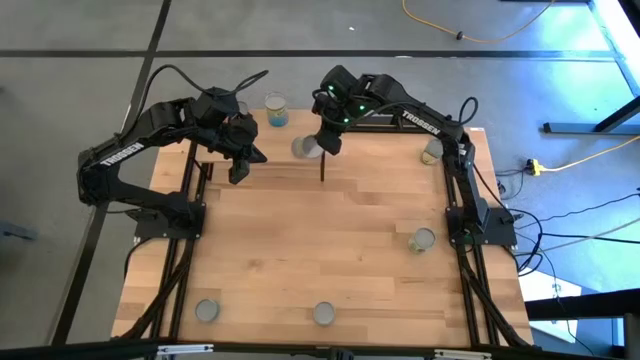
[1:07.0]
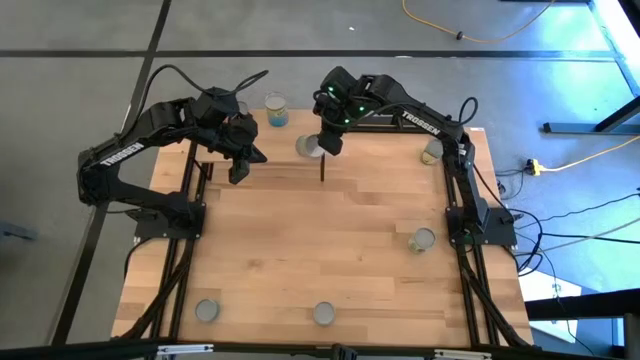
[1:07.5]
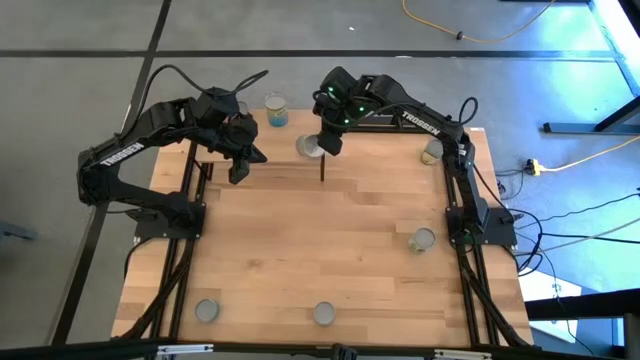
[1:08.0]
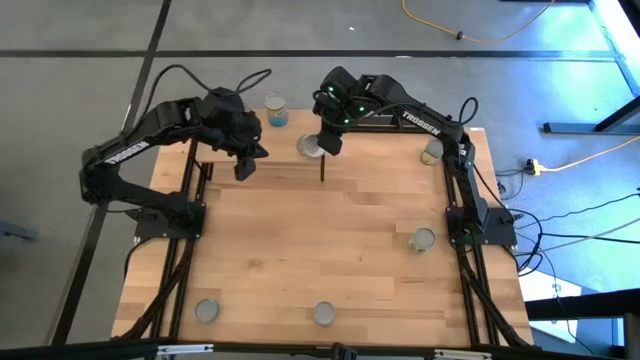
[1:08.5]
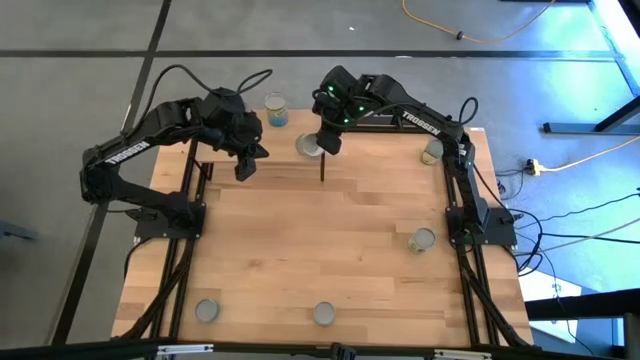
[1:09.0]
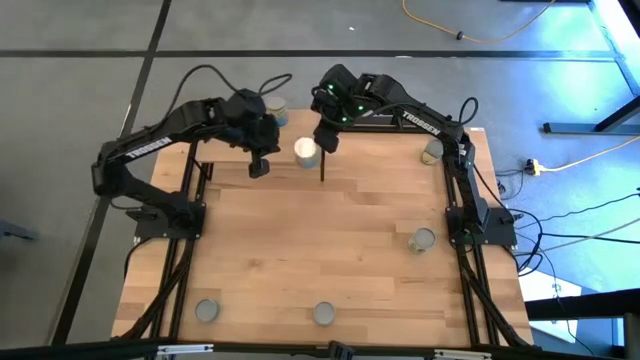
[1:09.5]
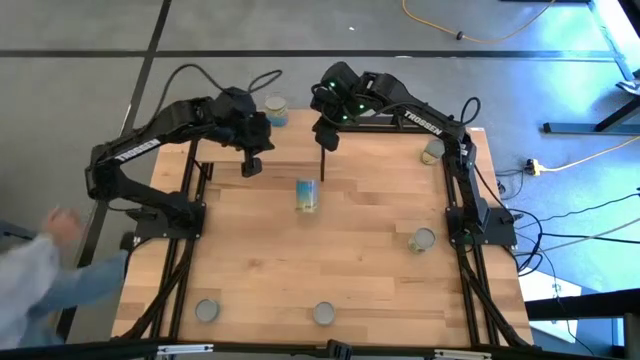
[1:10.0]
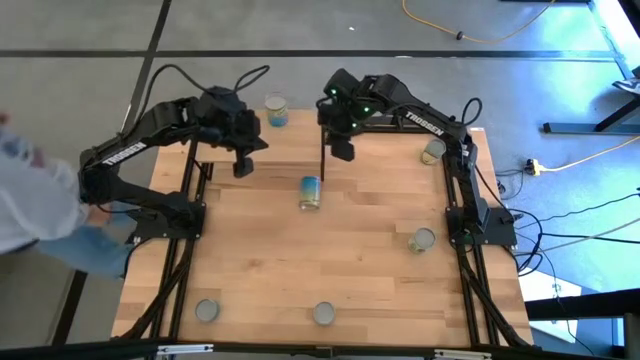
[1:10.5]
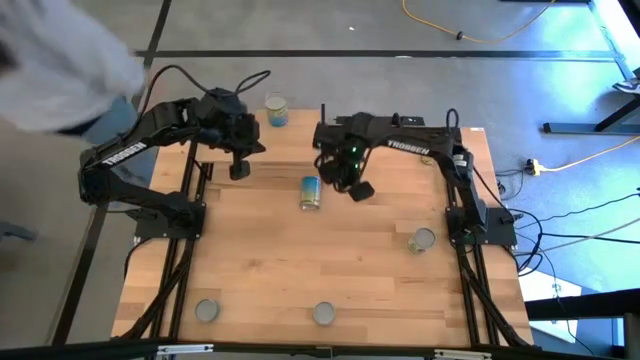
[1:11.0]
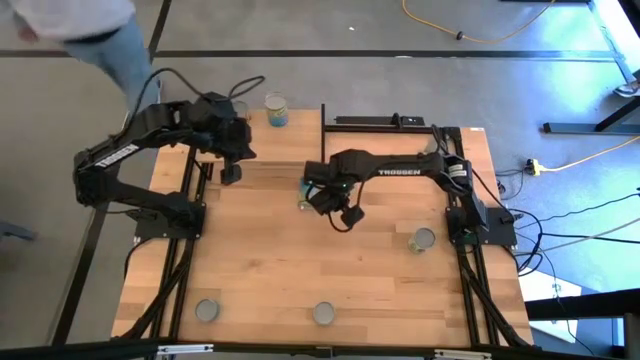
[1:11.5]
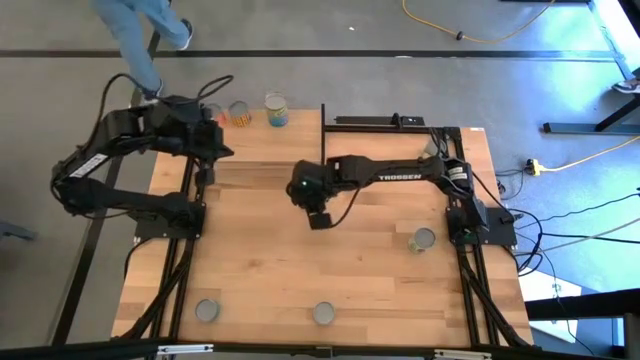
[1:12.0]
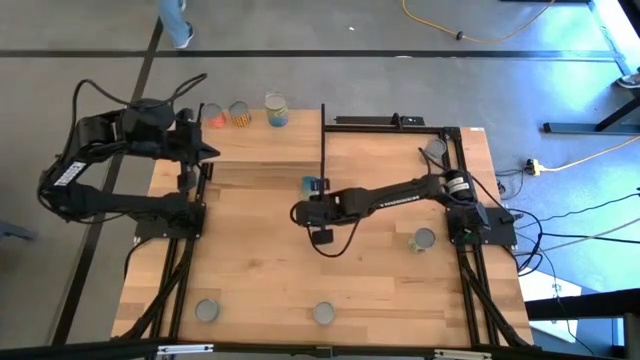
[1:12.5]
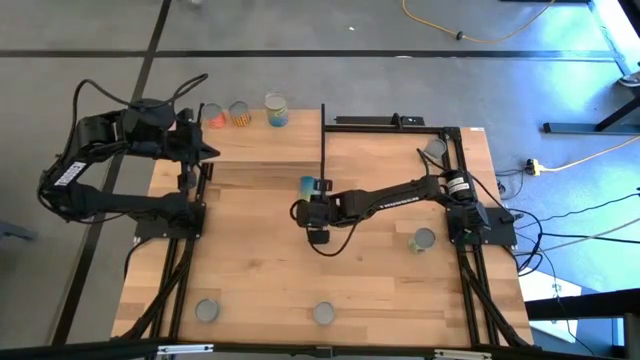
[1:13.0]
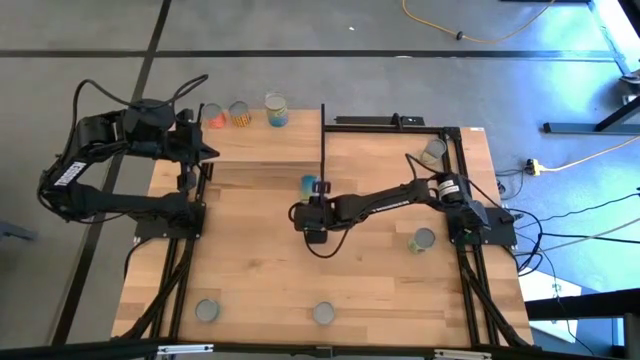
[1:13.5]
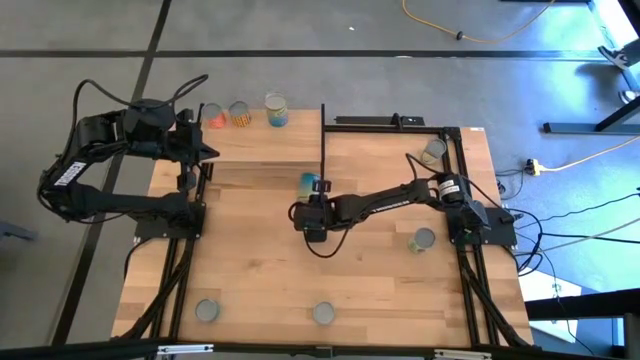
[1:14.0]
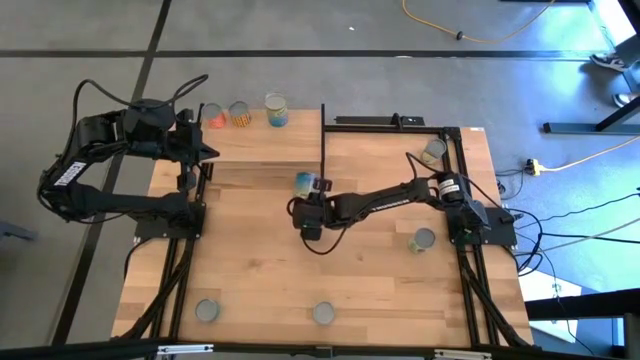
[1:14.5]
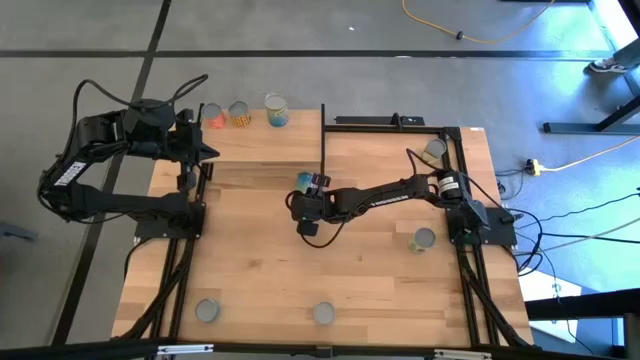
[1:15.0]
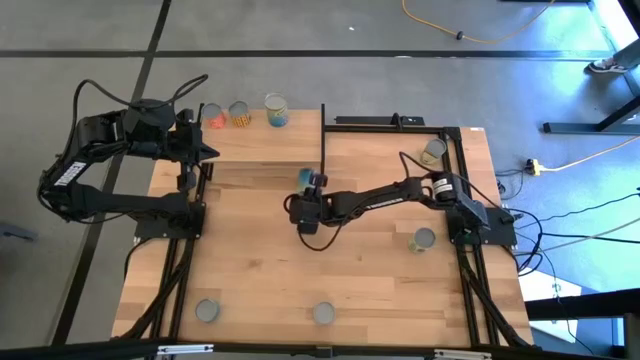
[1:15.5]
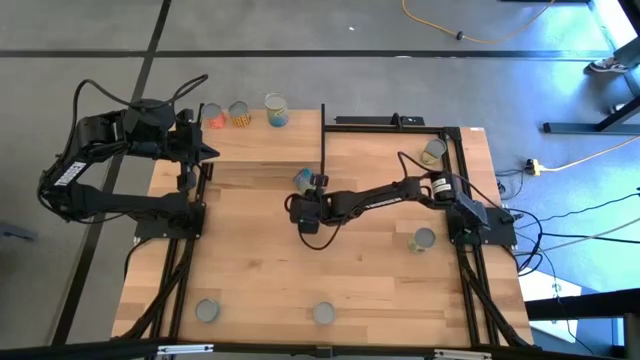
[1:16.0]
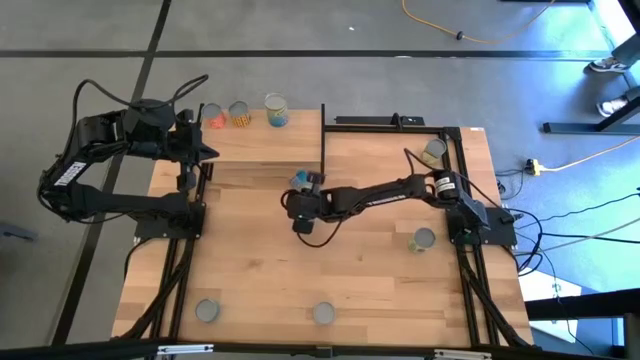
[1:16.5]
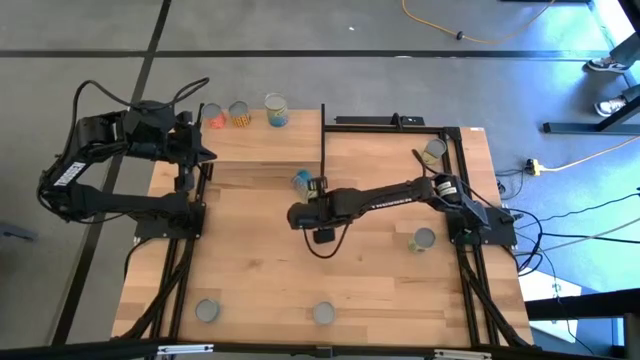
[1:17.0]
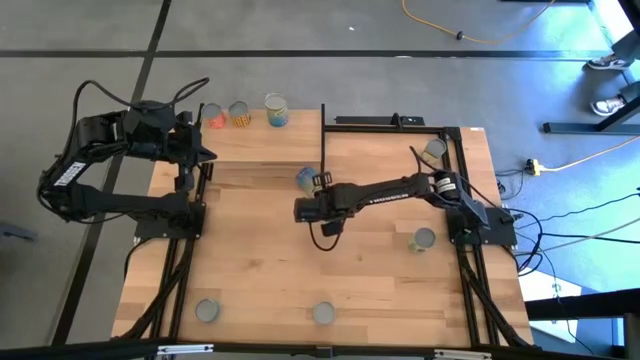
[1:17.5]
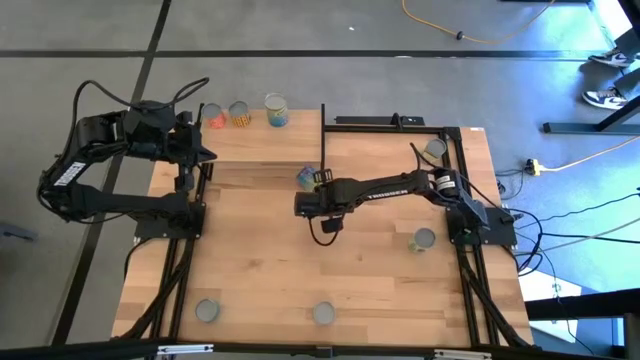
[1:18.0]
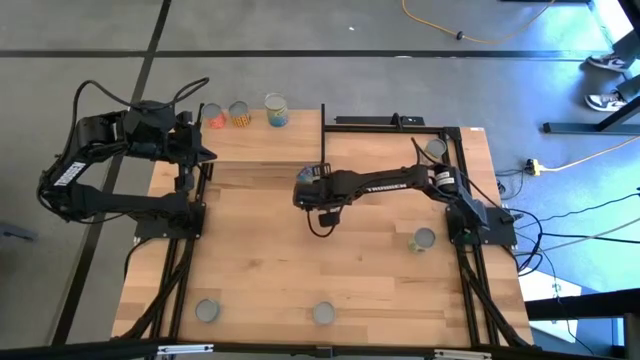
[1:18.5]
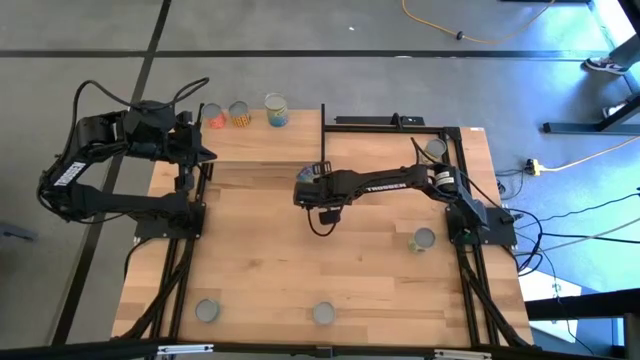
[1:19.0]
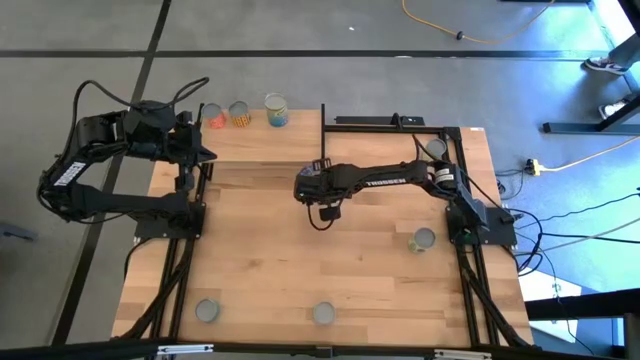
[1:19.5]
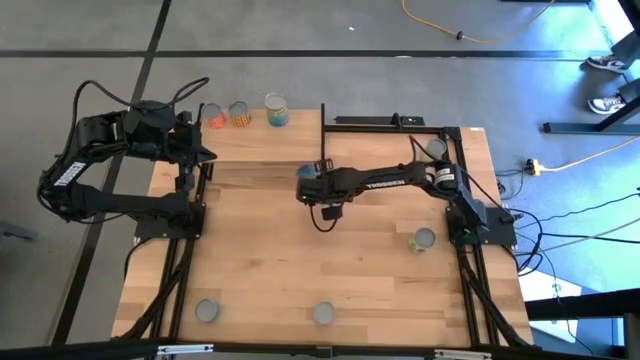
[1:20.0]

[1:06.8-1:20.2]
Task: Pick and place cans onto a shelf
Put the canned cherries on the shelf
